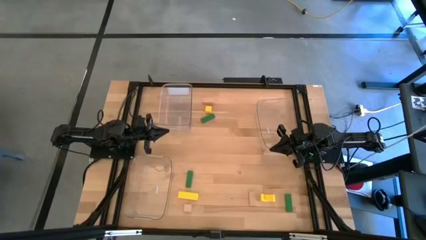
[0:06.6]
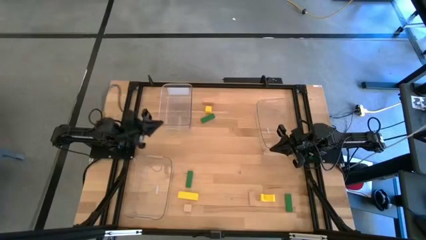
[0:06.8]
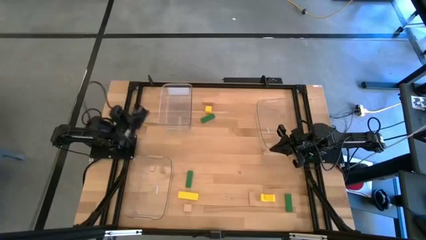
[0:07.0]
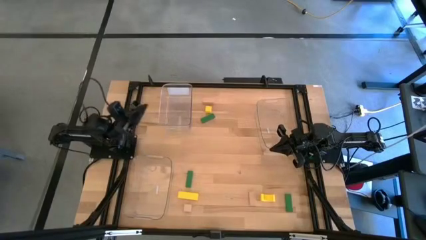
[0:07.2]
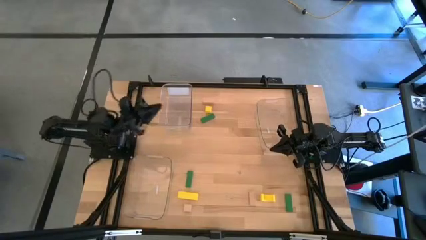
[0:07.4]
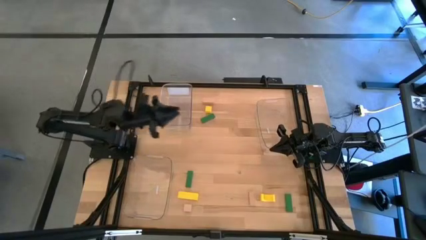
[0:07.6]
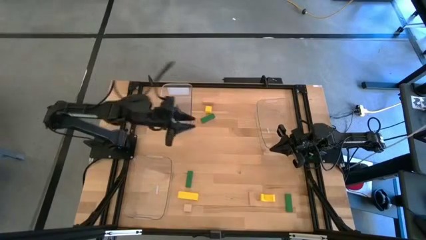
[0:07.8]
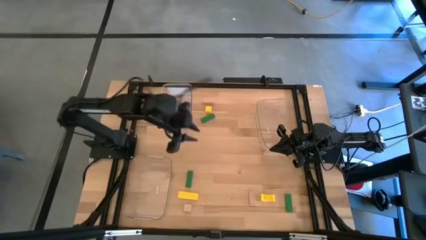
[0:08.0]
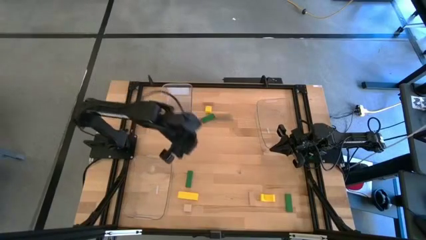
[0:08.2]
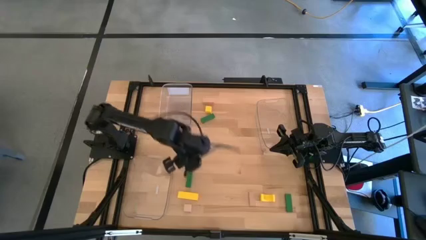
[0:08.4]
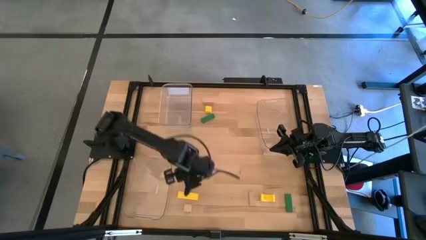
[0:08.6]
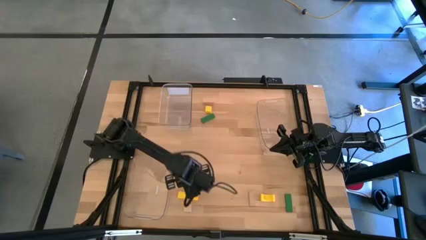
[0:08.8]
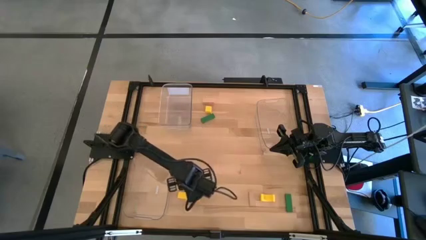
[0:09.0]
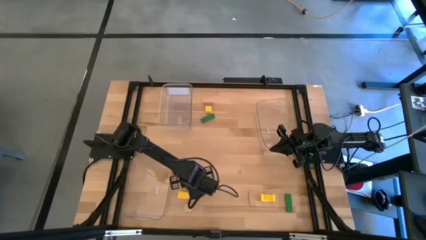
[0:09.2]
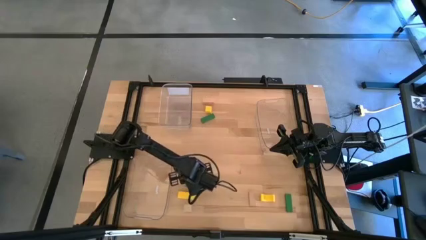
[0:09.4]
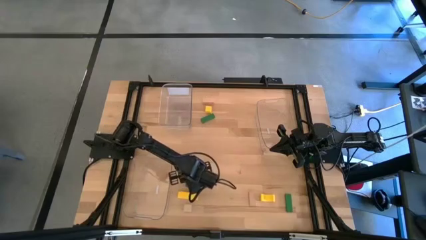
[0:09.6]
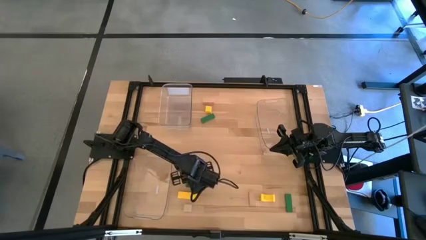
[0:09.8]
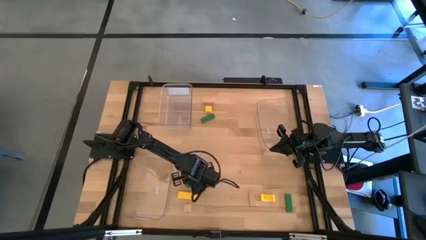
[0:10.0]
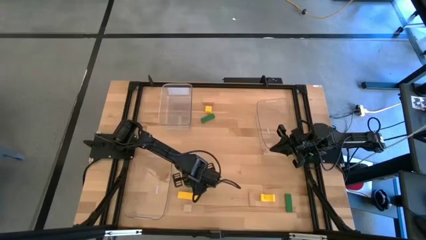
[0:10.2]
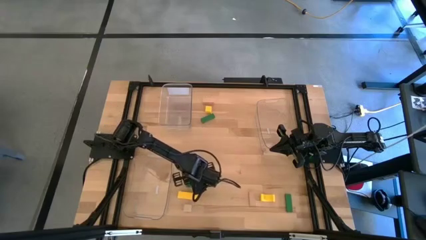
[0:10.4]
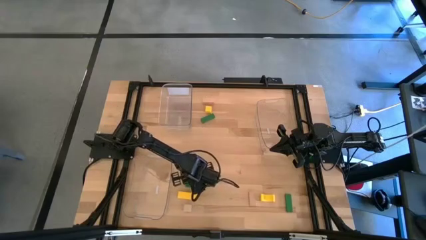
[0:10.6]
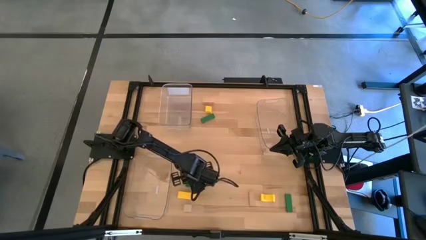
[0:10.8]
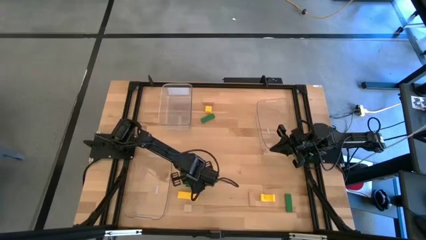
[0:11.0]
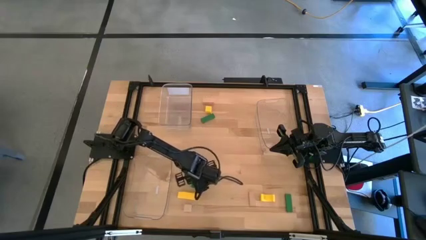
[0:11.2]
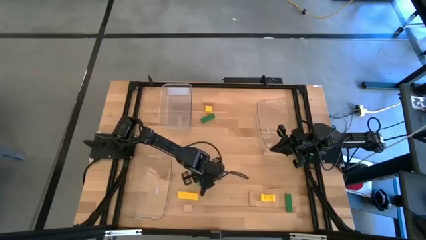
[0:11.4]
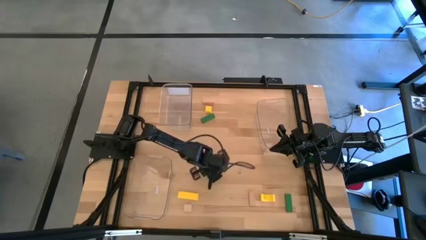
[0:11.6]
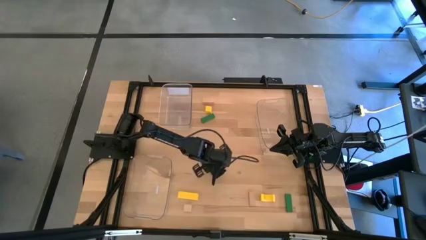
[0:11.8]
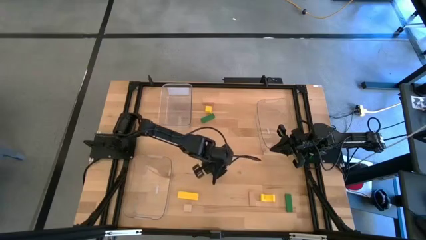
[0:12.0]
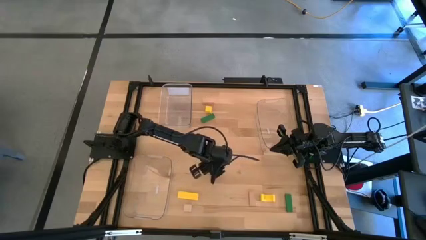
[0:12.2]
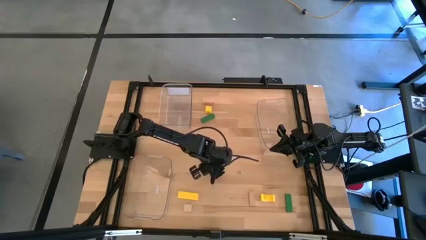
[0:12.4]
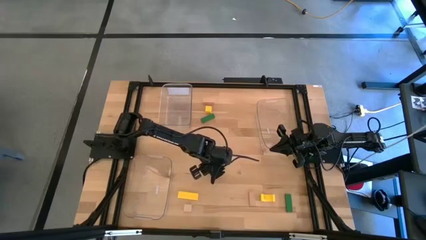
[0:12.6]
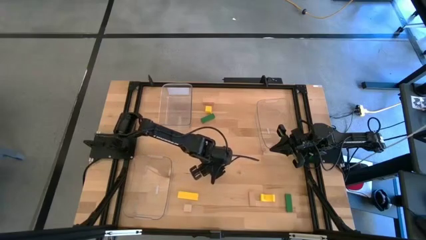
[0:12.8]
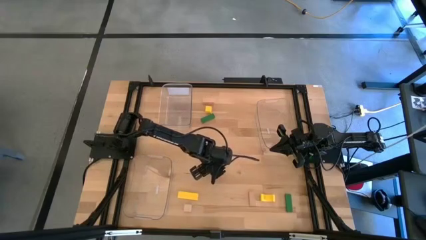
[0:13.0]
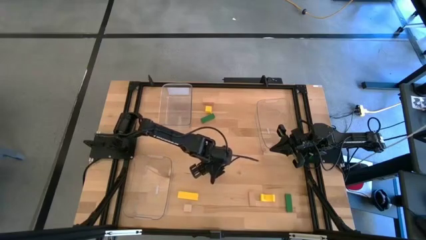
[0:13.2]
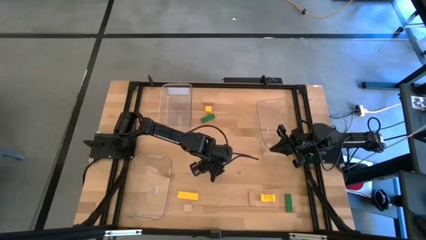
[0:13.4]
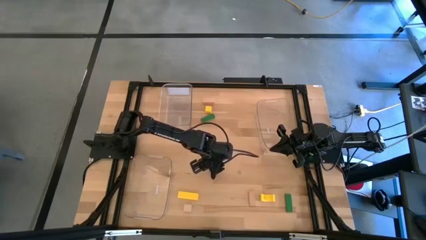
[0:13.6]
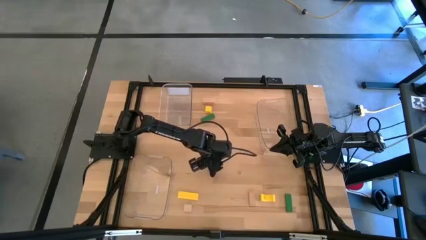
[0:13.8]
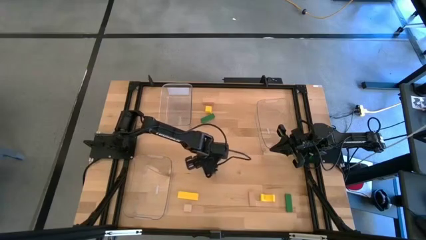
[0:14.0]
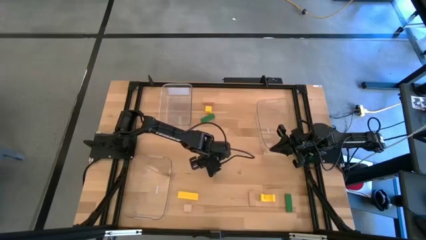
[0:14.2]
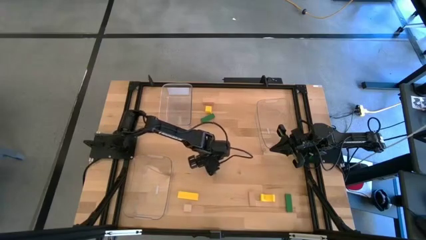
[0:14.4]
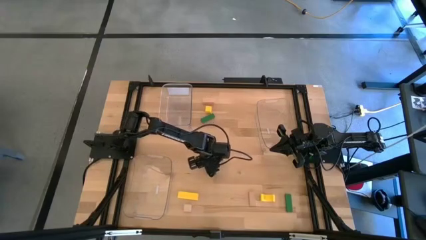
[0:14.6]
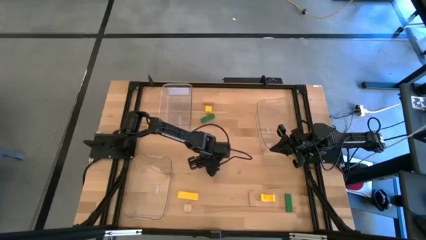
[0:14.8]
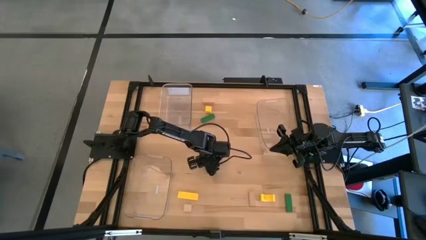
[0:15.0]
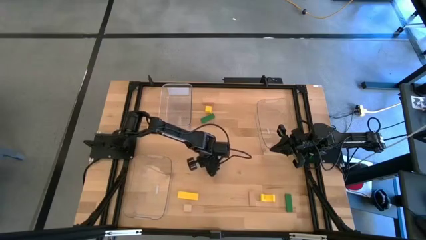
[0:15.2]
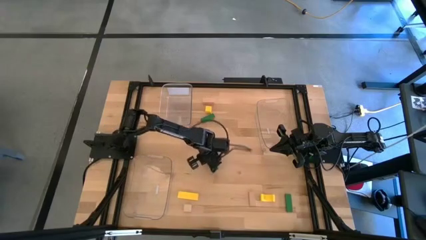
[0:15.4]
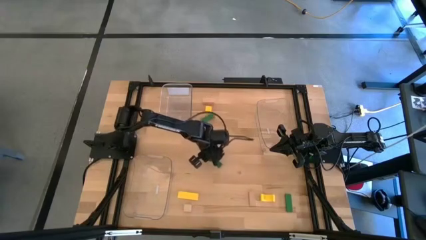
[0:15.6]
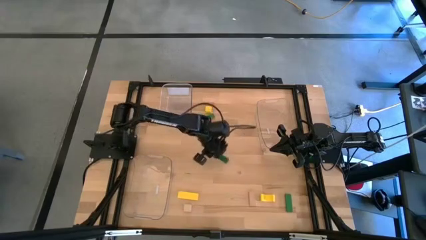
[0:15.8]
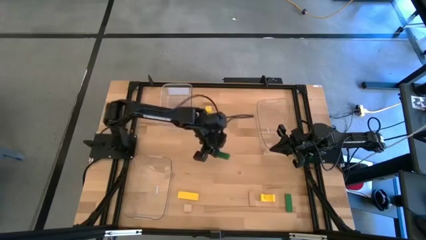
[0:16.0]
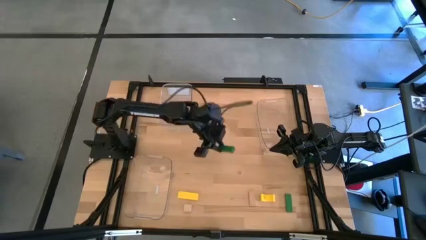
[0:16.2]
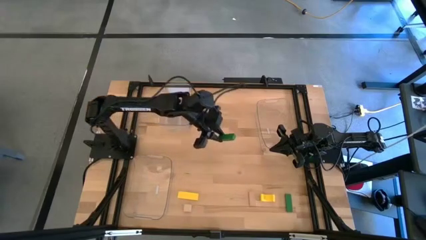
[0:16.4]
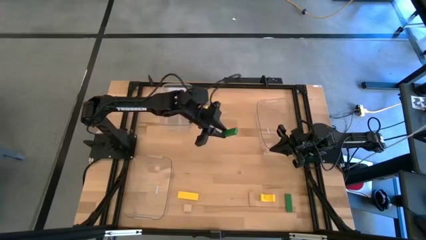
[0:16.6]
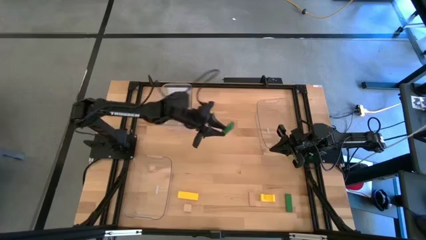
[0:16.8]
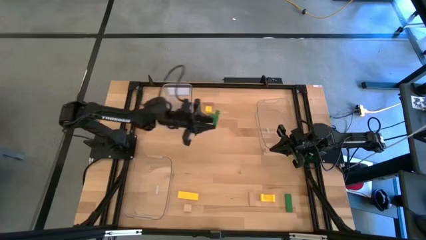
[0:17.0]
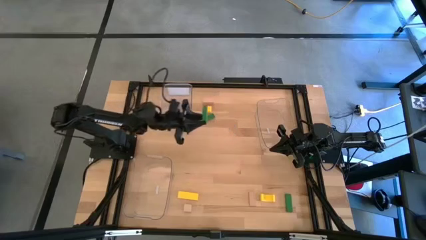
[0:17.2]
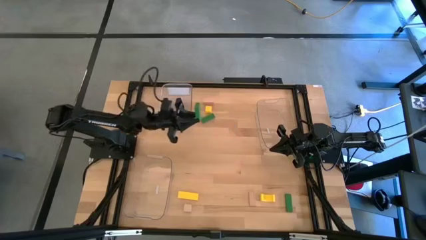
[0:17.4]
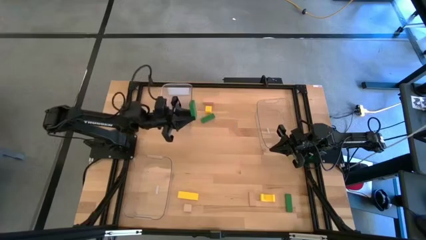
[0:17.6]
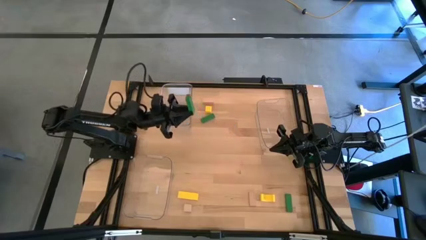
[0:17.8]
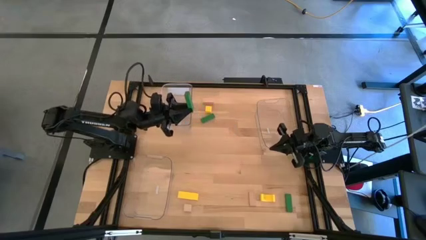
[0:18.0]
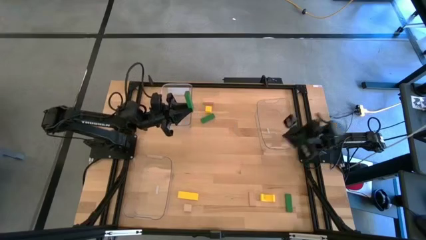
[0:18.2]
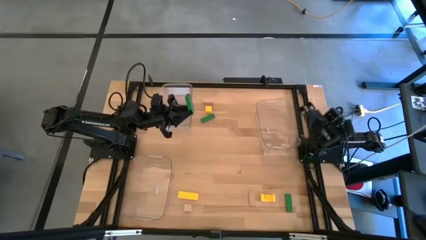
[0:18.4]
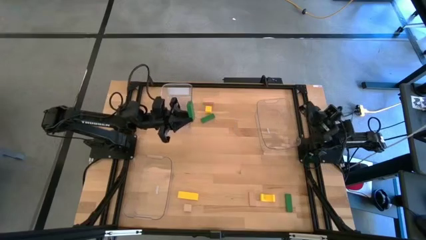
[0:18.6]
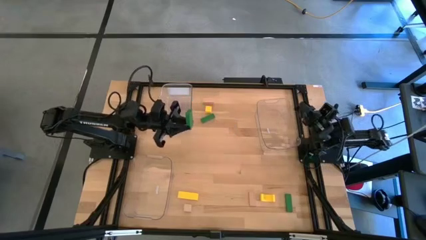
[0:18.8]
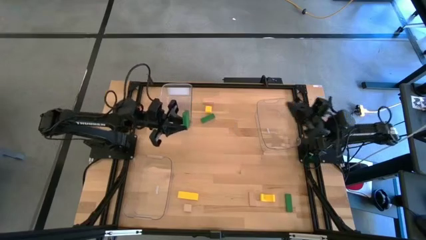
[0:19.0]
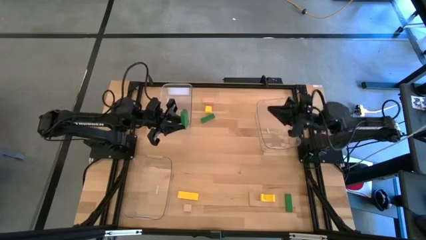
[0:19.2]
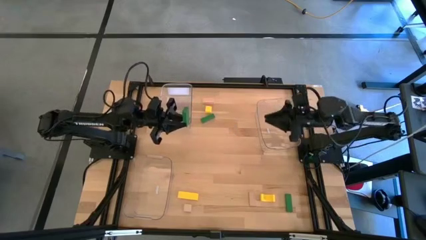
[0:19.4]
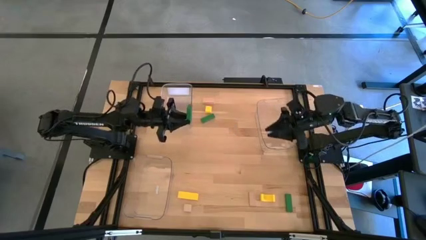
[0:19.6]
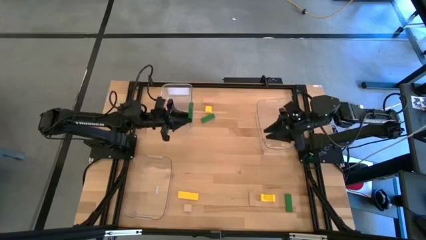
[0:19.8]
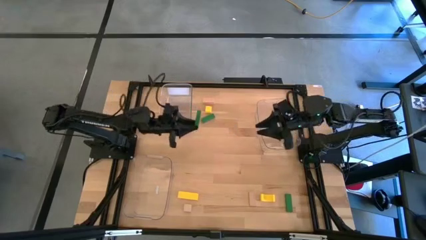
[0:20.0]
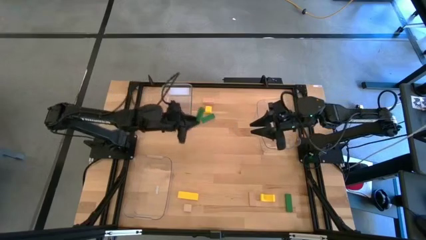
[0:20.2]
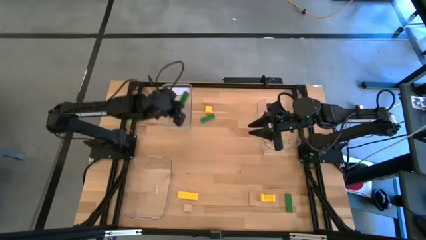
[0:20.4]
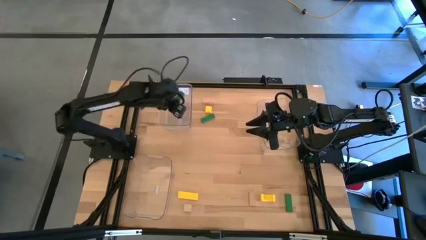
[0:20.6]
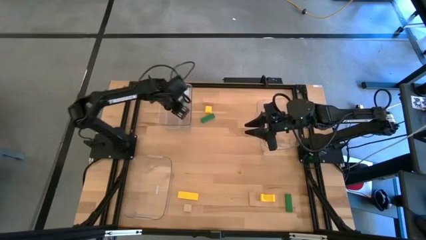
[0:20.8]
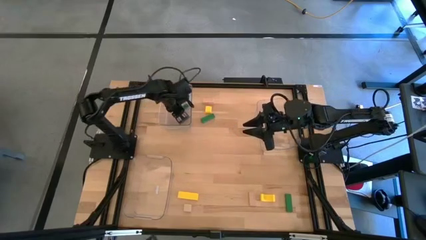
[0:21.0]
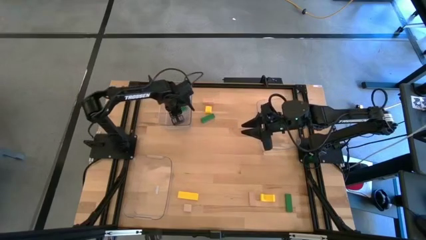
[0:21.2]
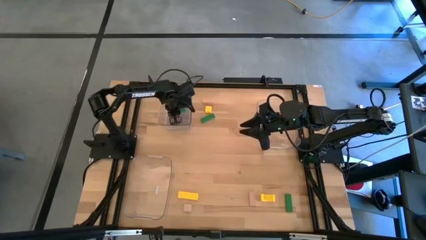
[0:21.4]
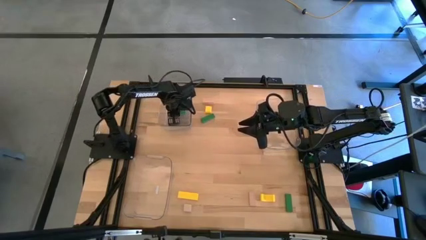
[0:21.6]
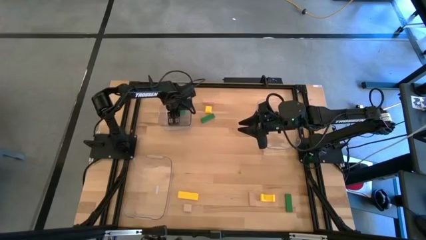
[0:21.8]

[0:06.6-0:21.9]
Task: Sort & place blocks by color
Put the bottom left green block into the top left transparent bin
